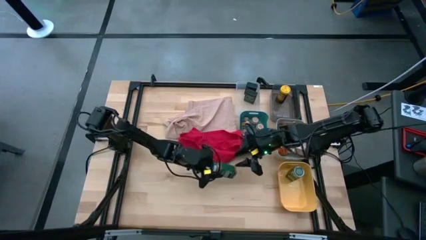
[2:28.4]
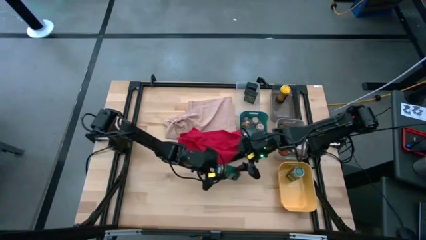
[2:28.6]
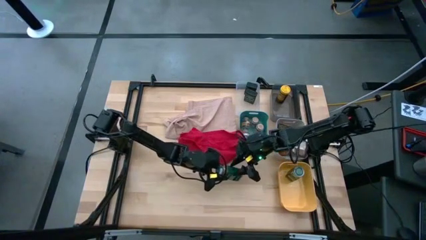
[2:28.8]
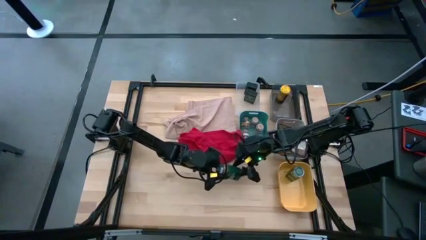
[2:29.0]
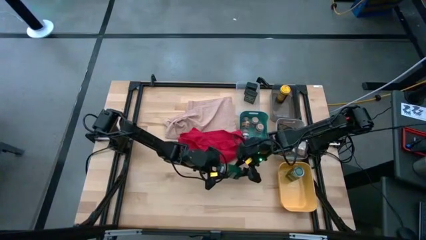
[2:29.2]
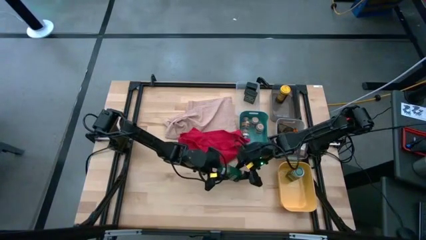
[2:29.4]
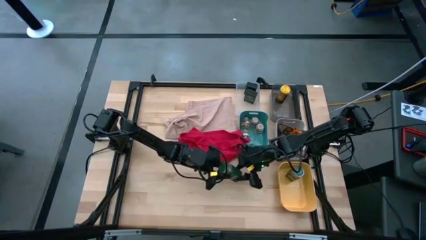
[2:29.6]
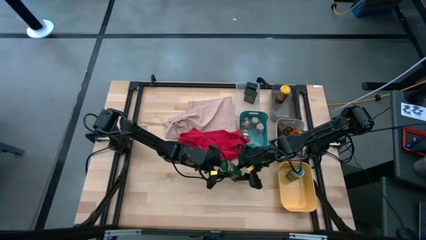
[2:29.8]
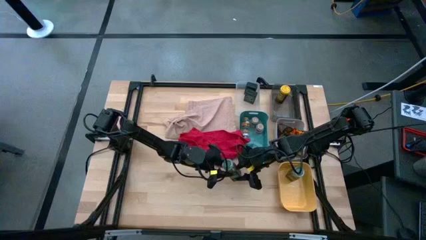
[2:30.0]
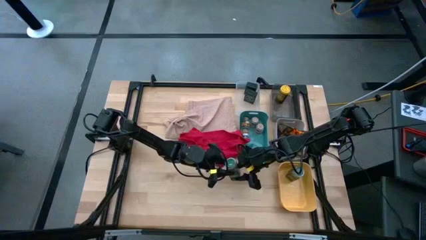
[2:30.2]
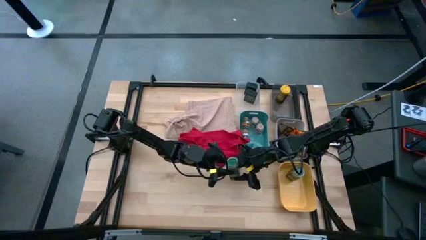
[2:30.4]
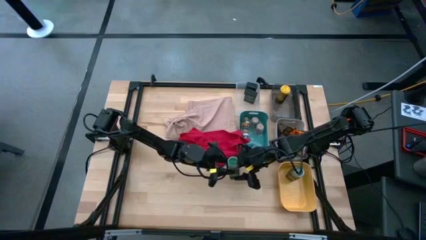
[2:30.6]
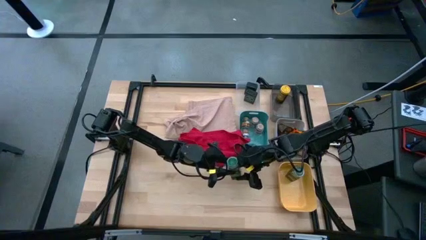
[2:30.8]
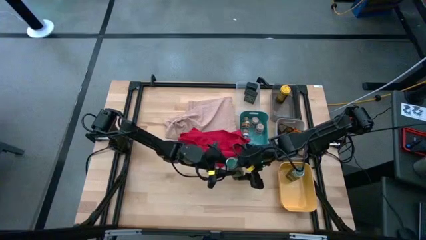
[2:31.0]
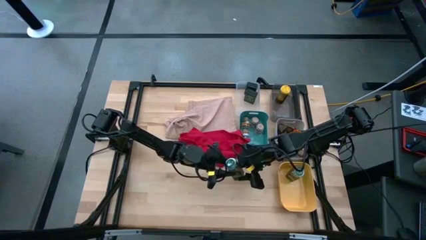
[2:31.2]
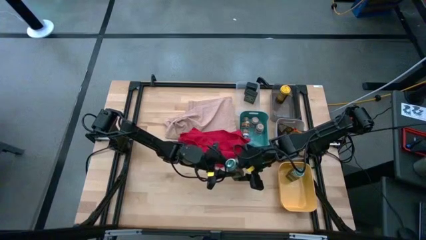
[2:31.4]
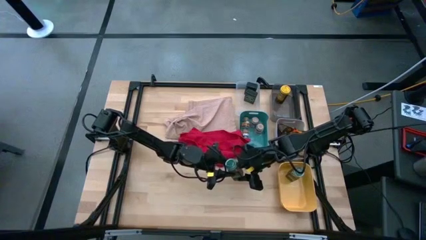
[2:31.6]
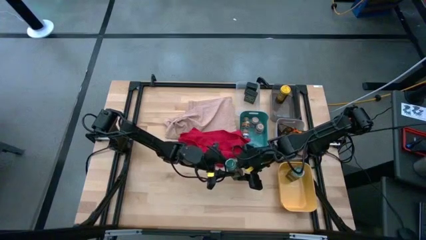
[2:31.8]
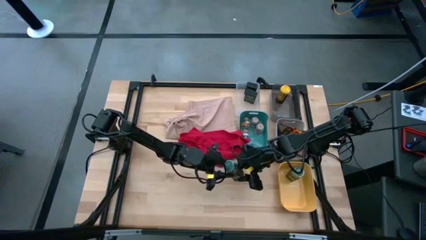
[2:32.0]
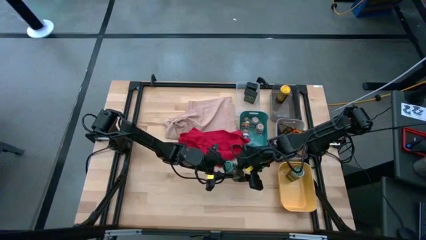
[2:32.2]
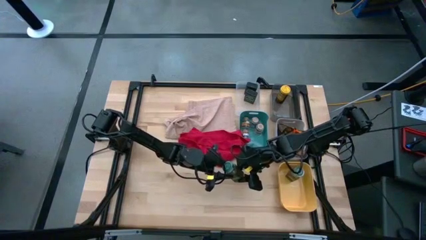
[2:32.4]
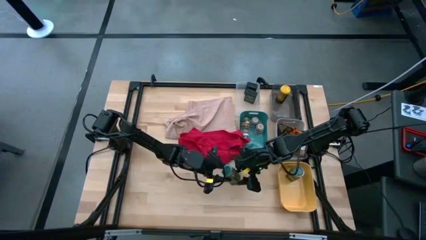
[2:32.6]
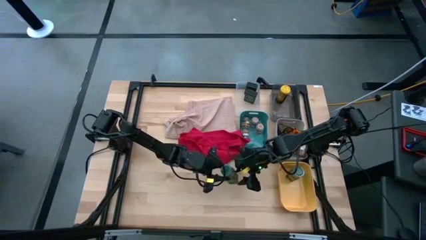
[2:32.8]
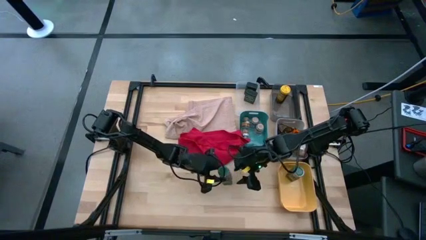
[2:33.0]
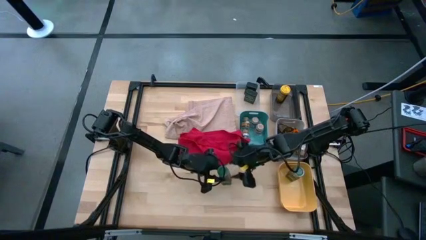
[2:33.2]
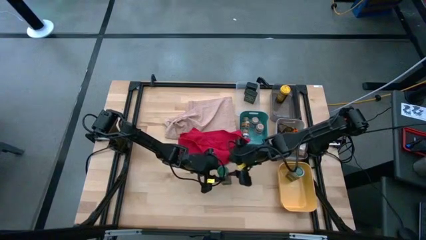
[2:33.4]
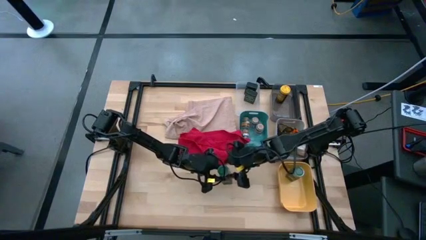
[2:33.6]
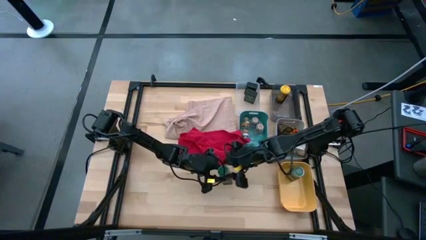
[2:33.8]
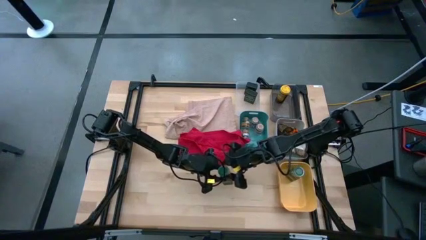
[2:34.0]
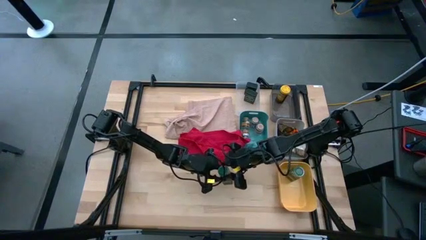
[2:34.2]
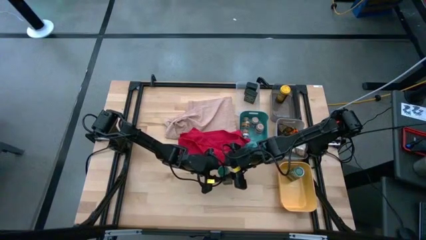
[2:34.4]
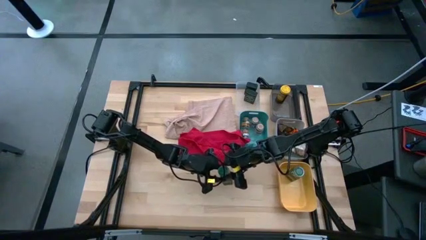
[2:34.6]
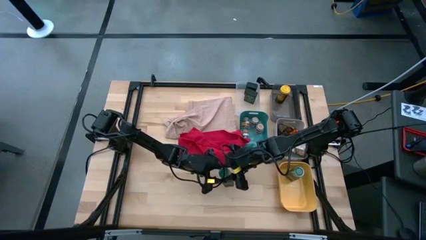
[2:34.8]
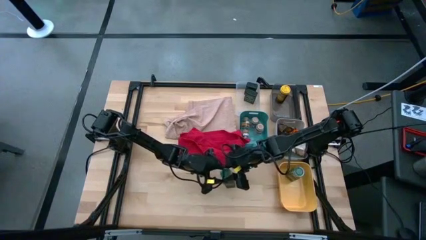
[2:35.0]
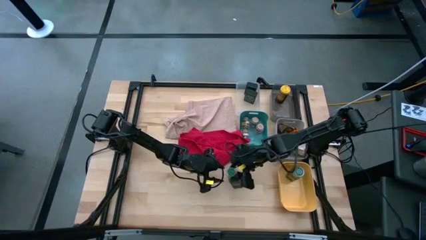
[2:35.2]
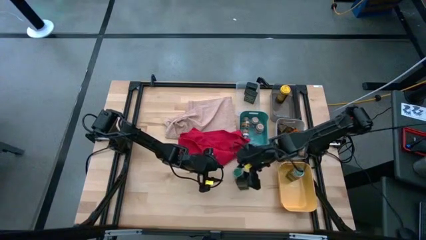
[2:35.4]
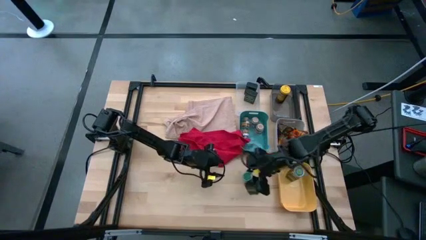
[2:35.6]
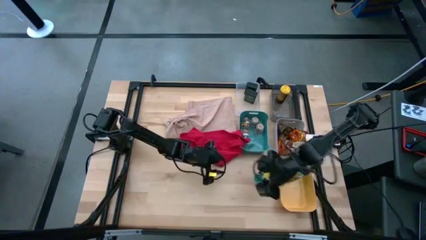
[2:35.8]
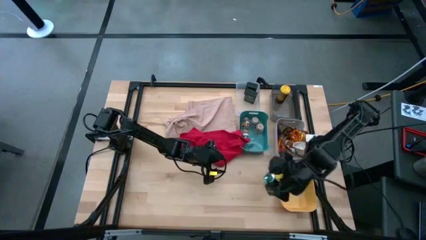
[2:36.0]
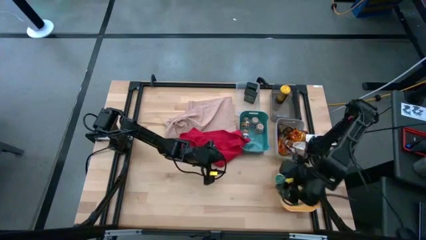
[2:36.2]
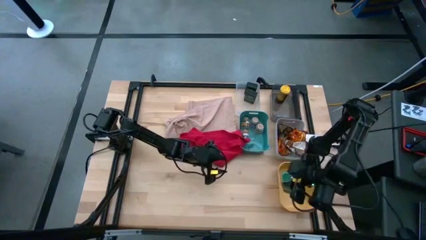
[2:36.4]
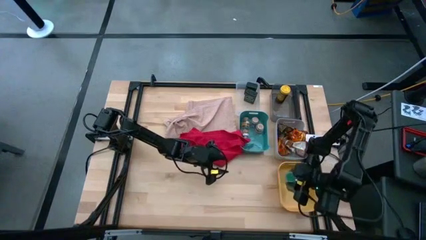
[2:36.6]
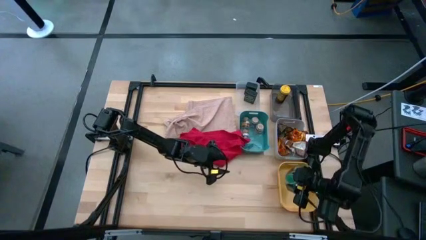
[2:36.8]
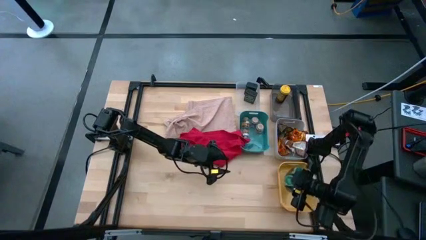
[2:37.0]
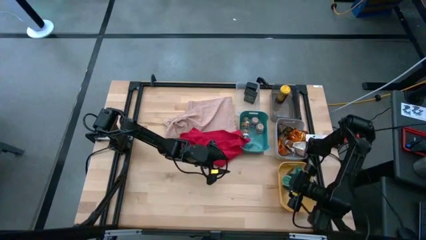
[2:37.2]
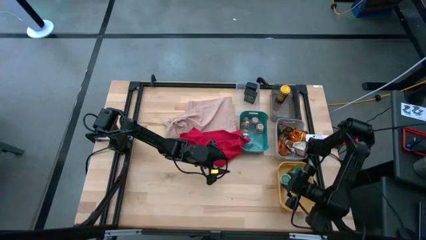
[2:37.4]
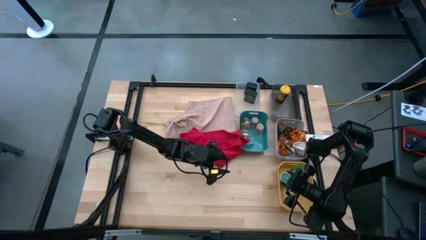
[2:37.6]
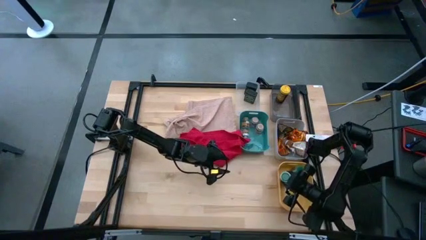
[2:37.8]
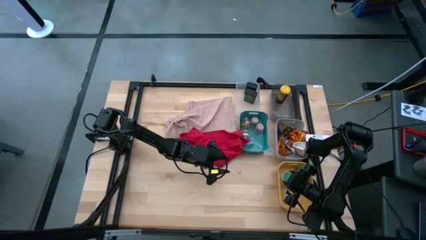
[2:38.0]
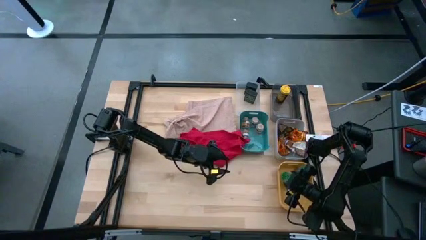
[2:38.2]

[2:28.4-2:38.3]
Task: Sort spices by type
Put the dark green seasoning bottle into the light yellow bin

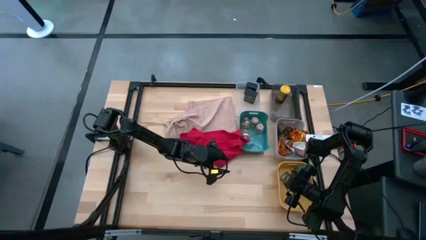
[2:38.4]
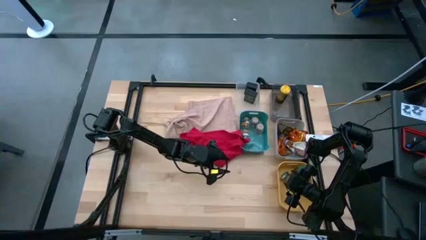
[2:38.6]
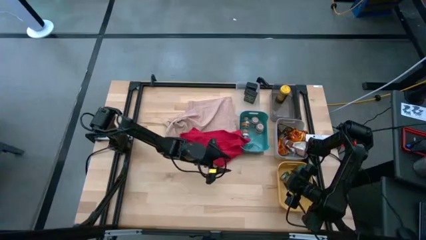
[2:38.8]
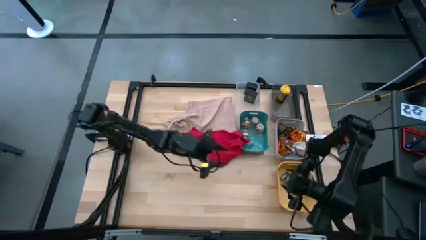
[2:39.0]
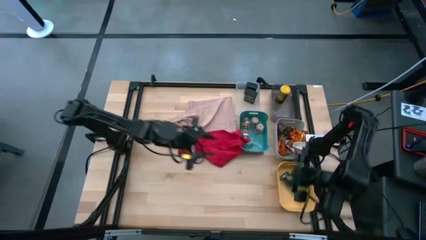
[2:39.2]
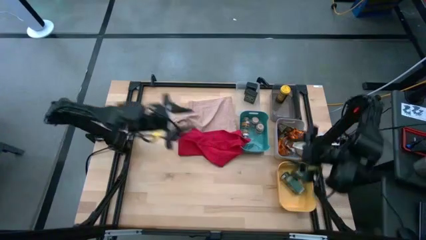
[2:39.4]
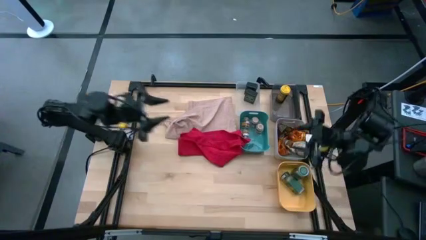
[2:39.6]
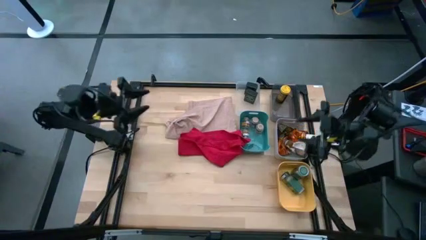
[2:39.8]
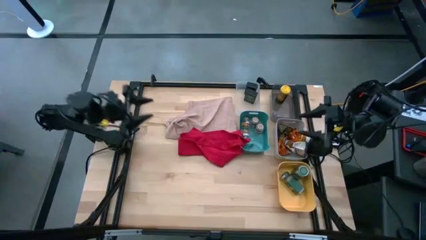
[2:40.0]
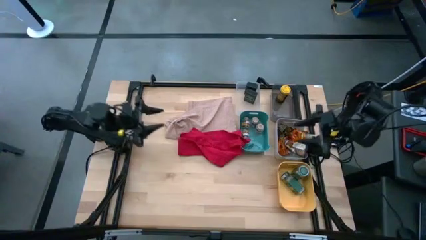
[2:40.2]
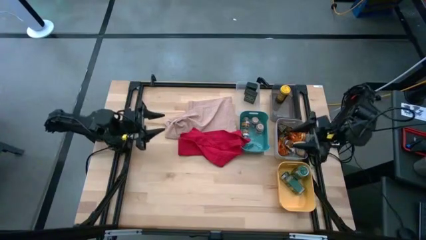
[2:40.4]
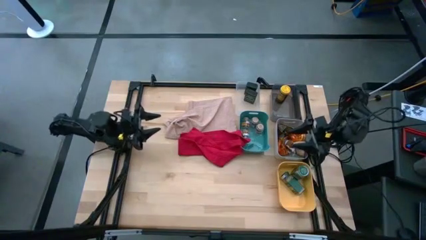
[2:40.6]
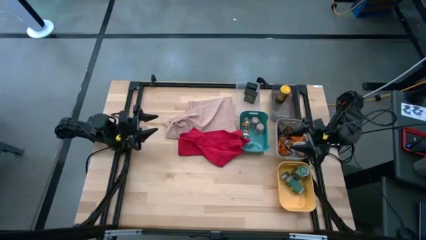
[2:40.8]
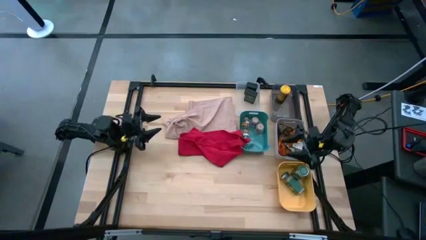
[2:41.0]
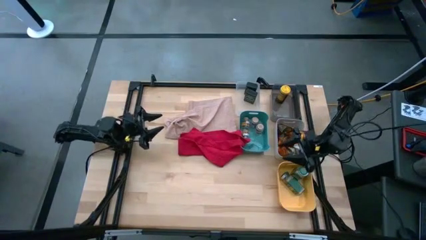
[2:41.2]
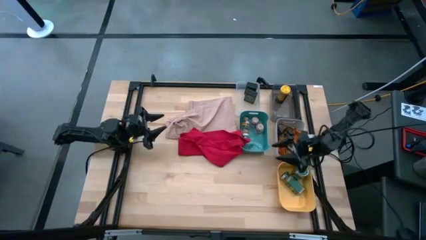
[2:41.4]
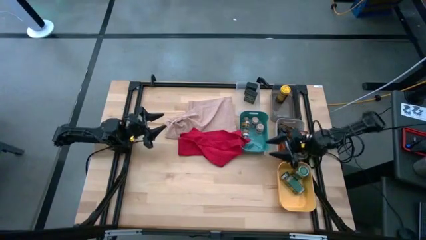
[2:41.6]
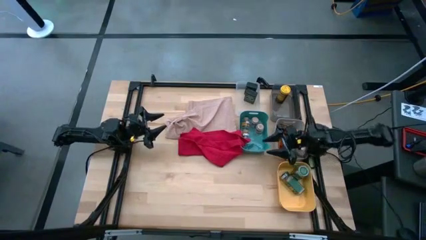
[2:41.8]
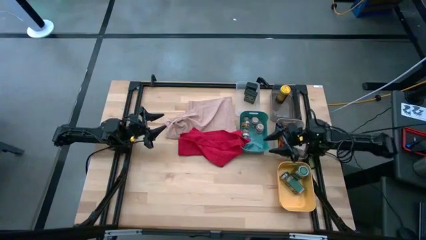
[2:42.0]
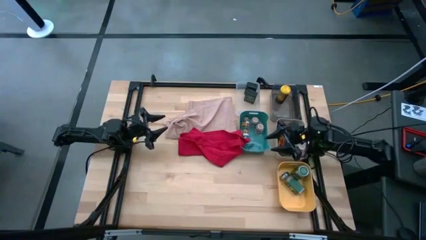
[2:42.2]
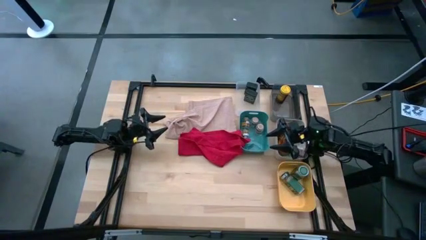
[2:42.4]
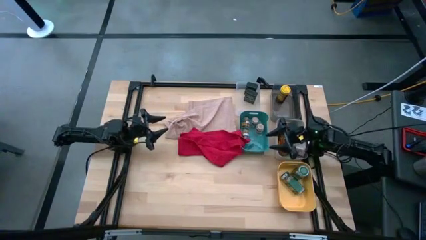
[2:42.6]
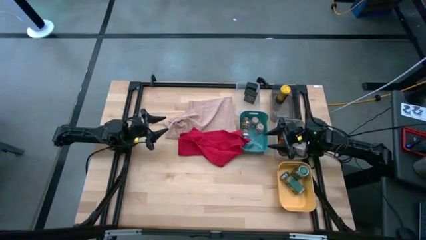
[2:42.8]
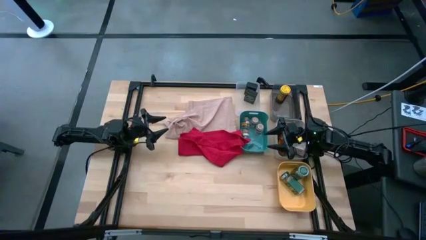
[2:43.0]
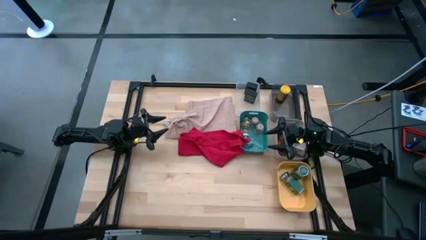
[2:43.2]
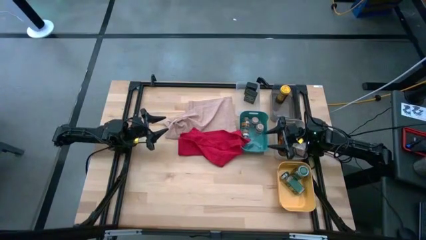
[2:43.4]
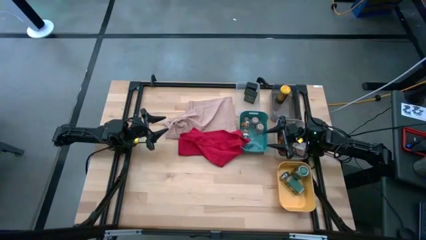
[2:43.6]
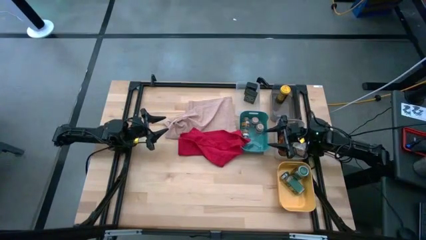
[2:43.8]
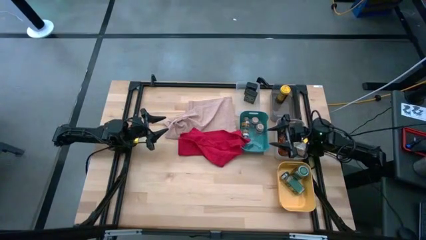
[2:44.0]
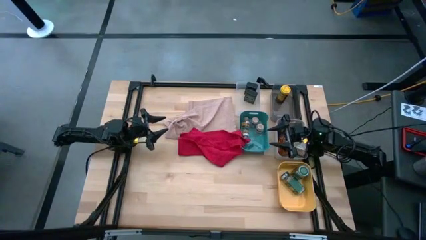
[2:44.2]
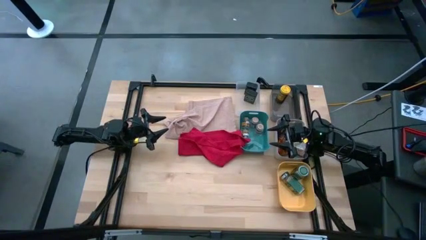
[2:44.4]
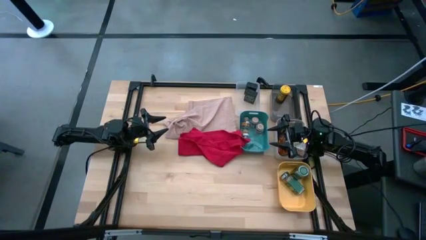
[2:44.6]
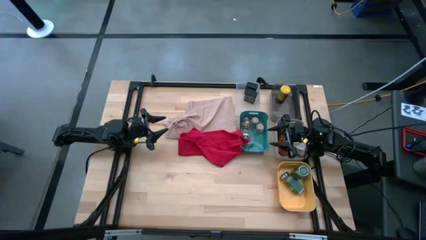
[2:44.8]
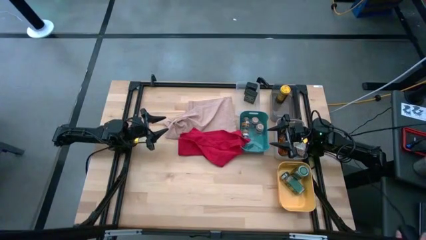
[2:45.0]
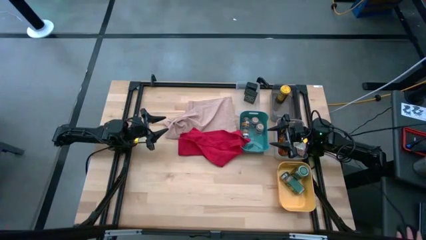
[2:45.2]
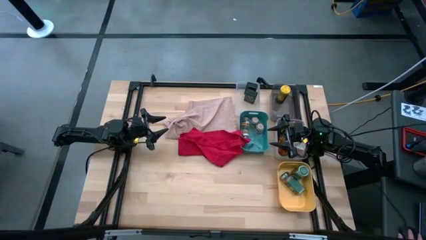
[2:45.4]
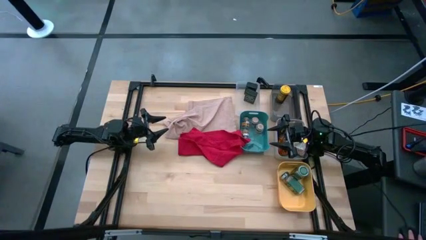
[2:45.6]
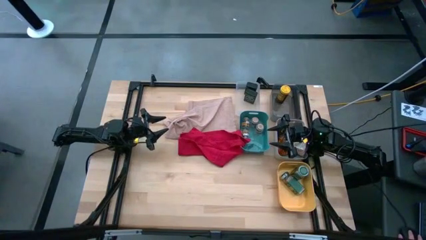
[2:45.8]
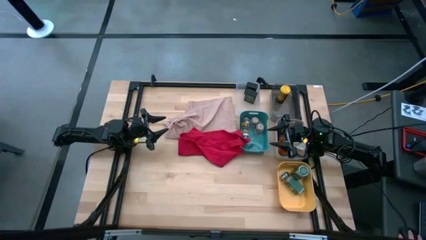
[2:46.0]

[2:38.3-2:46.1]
Return to Home Position
